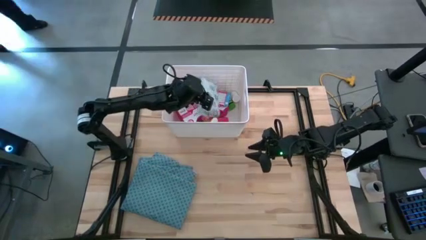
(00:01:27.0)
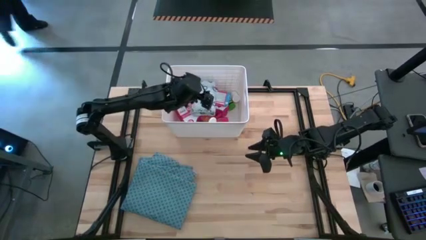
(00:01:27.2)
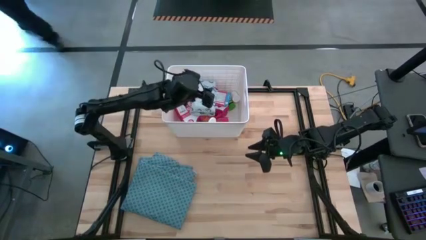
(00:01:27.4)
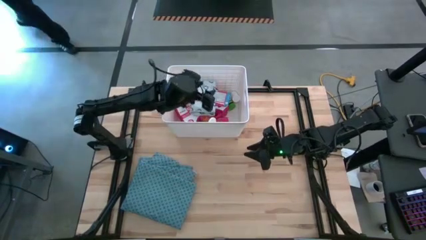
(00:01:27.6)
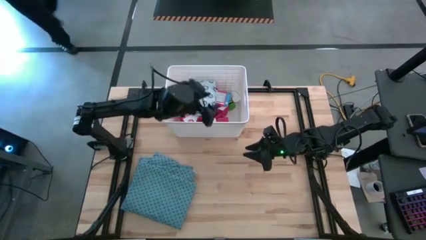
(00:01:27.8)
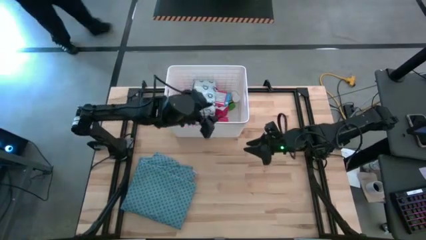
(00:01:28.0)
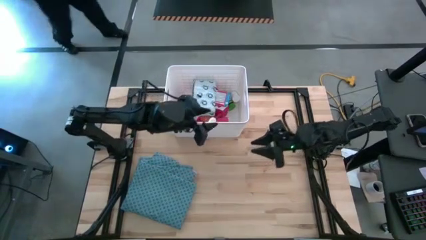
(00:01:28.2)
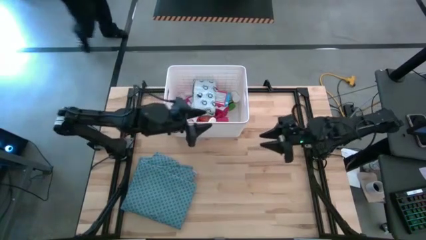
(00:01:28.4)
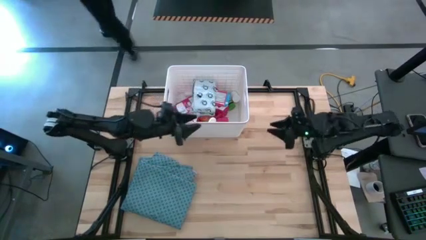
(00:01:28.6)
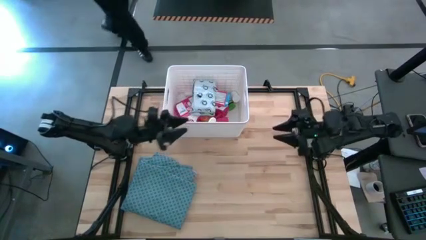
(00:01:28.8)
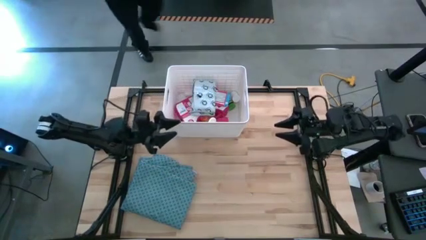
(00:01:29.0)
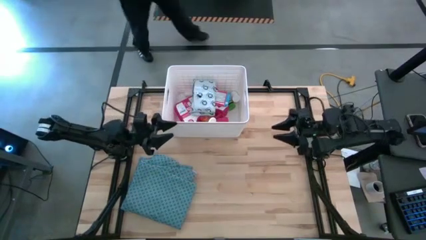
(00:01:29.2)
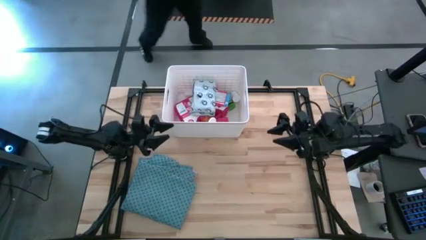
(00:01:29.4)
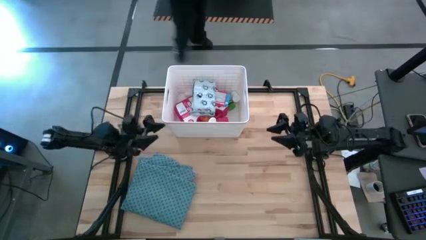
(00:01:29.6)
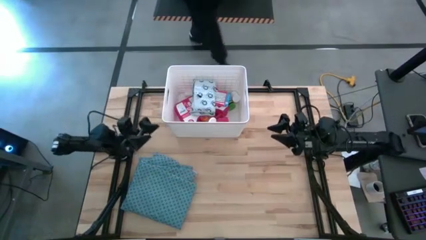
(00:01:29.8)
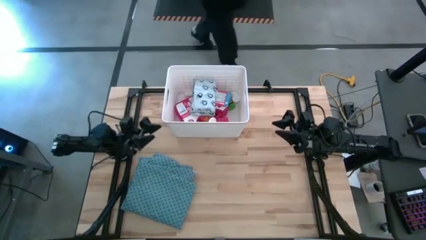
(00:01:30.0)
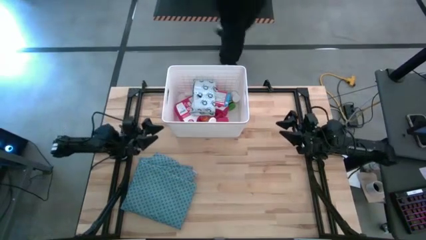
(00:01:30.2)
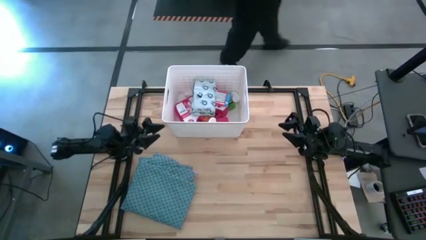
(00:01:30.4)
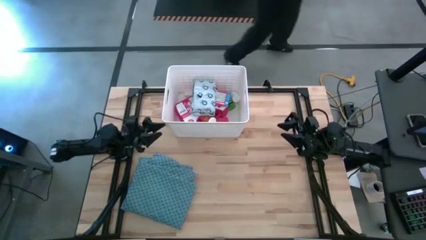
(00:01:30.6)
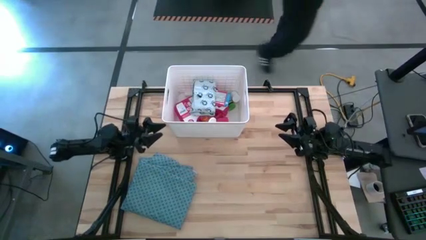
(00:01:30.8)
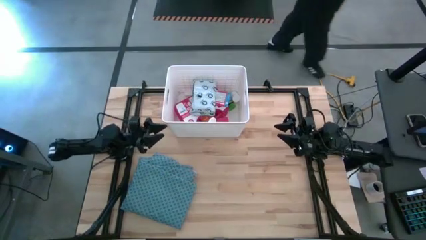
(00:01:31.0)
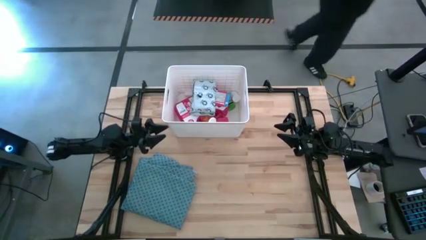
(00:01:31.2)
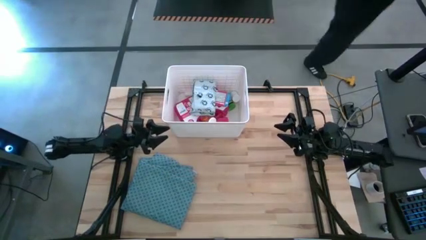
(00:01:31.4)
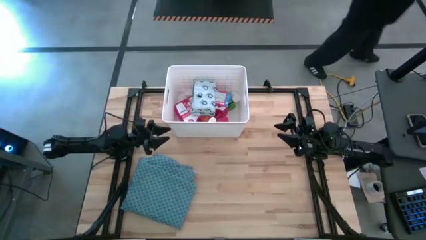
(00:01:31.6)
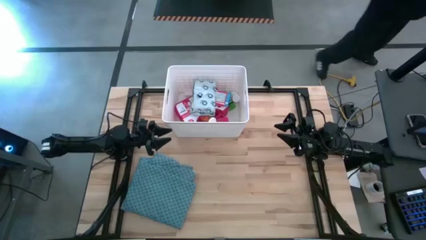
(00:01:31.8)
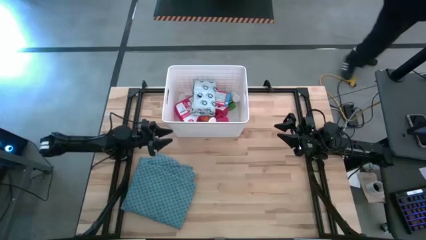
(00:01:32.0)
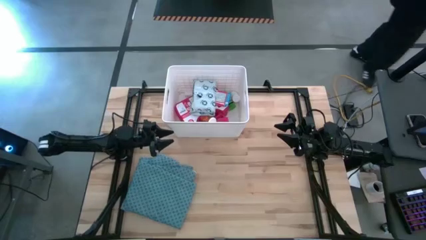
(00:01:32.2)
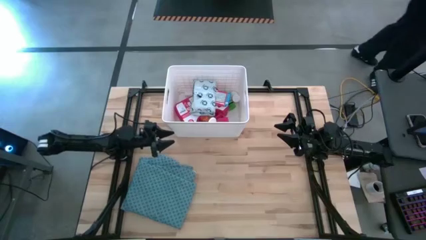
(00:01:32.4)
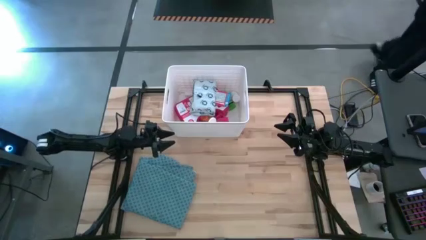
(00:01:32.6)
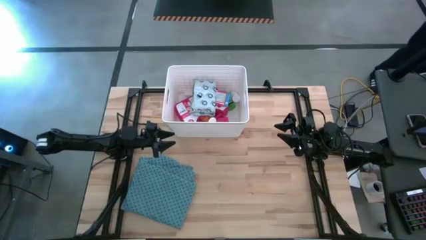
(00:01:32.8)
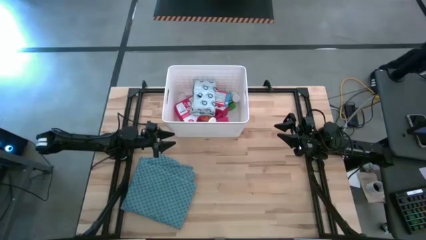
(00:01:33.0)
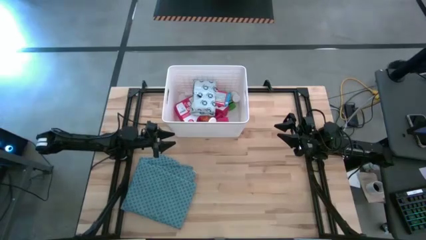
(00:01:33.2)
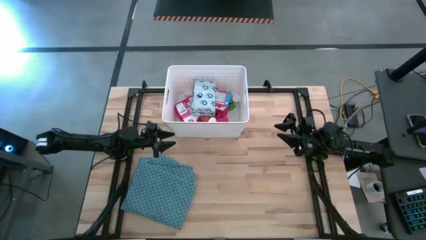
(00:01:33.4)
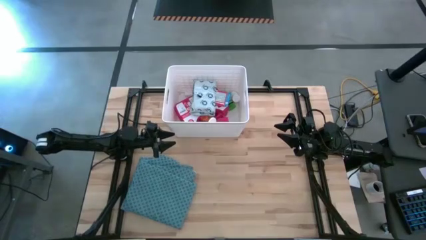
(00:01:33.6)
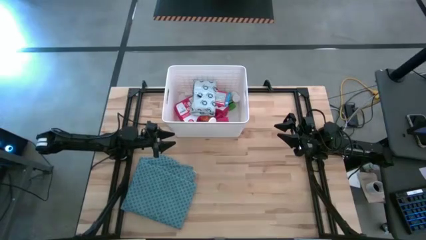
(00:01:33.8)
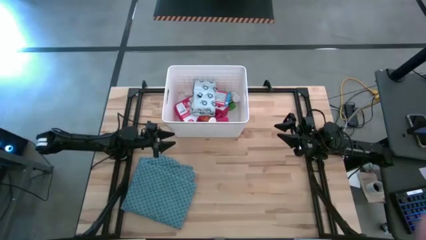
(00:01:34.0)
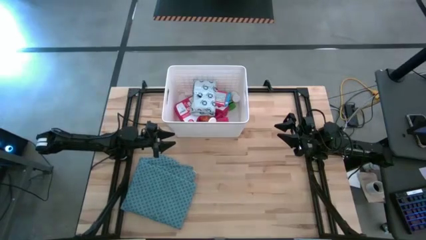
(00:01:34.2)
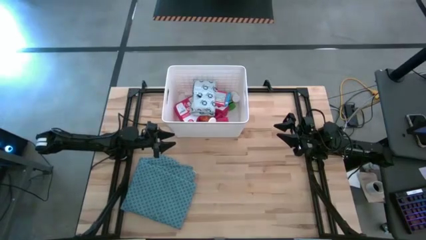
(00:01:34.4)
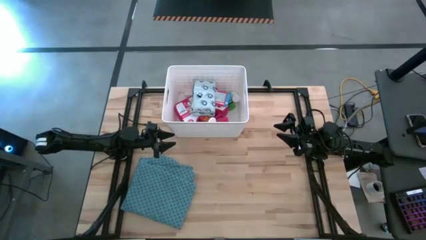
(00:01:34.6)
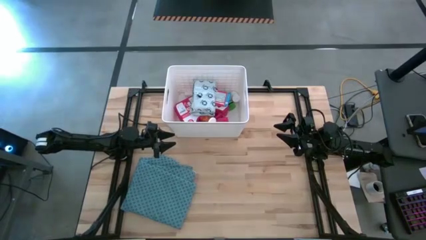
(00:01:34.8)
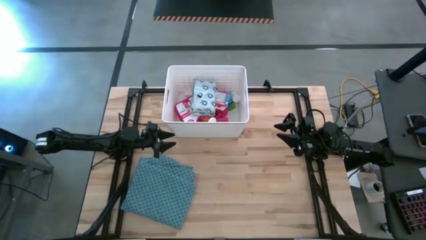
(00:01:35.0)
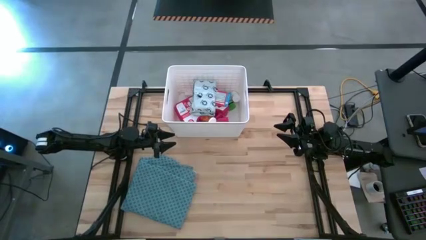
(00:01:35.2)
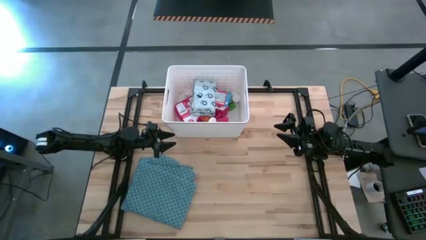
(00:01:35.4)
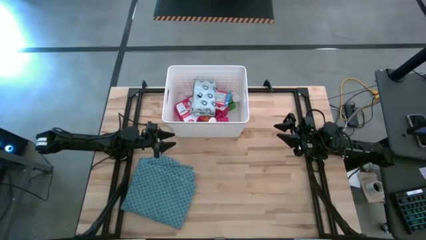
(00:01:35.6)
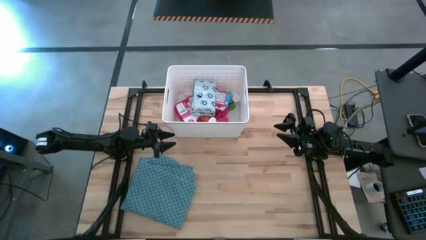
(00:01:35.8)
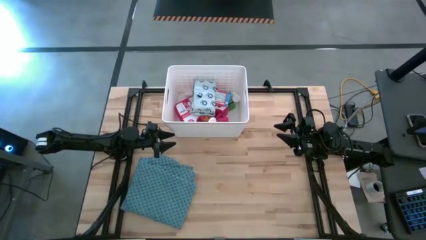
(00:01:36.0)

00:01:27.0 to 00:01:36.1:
Task: Pick & place medical supplies in basket/bin
Return to Home Position

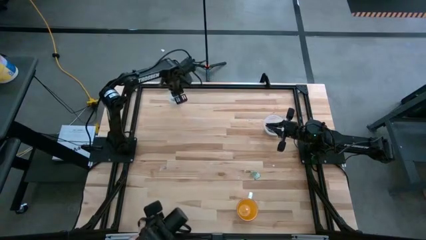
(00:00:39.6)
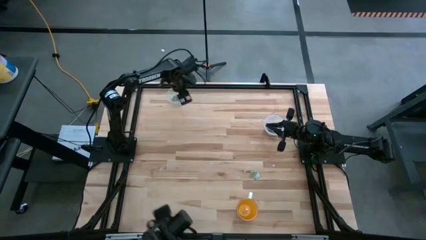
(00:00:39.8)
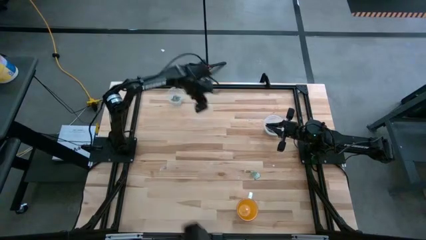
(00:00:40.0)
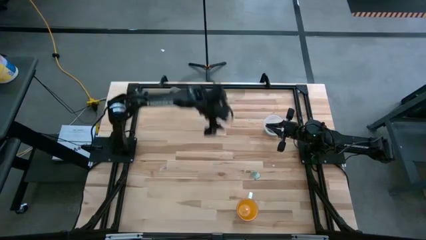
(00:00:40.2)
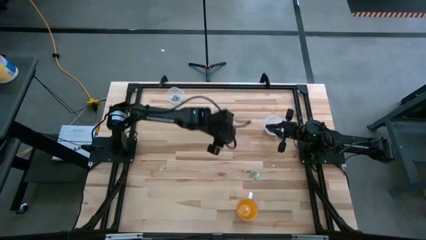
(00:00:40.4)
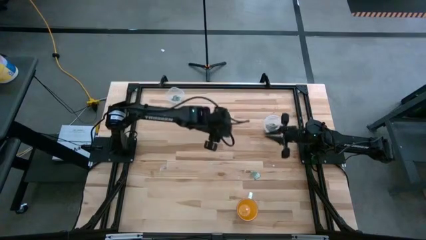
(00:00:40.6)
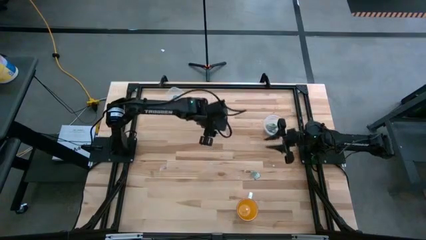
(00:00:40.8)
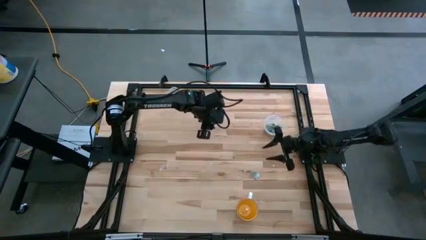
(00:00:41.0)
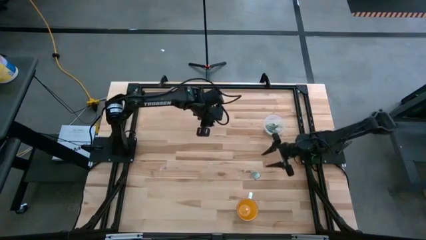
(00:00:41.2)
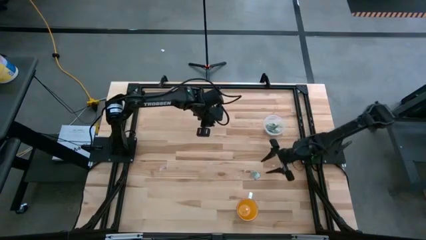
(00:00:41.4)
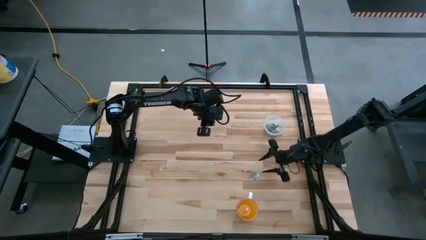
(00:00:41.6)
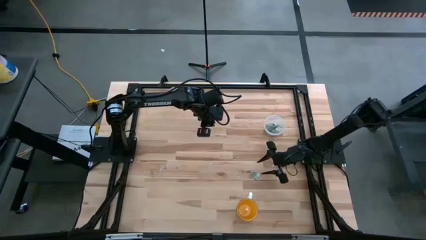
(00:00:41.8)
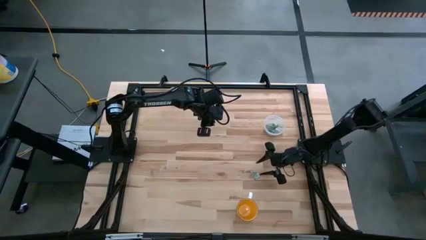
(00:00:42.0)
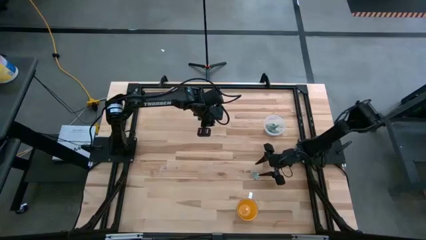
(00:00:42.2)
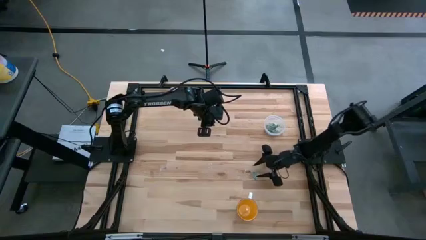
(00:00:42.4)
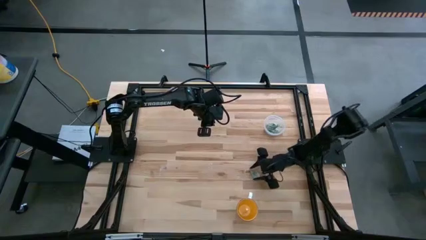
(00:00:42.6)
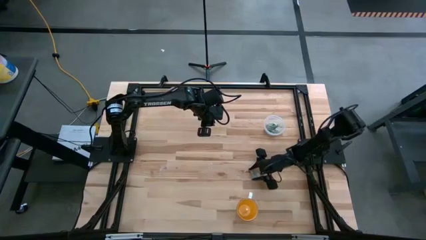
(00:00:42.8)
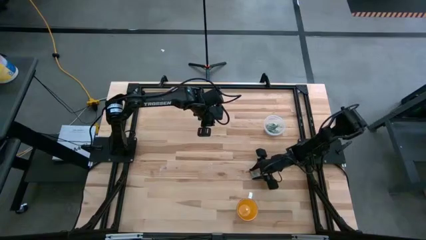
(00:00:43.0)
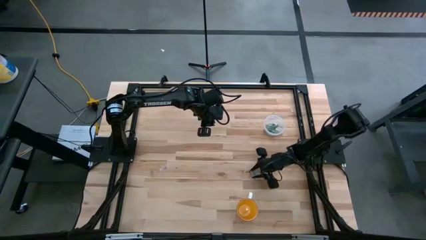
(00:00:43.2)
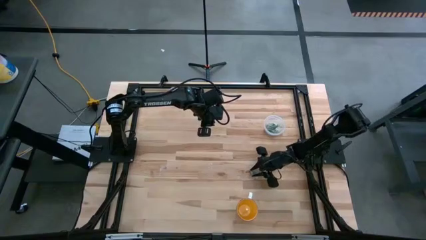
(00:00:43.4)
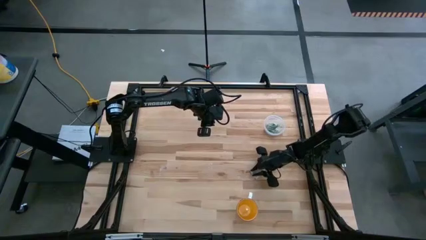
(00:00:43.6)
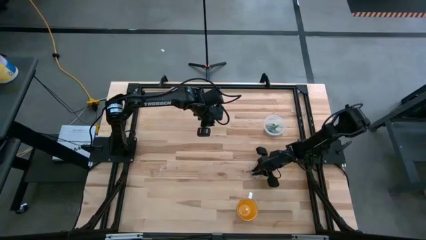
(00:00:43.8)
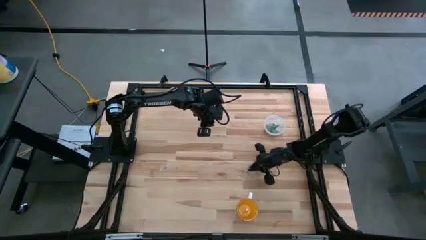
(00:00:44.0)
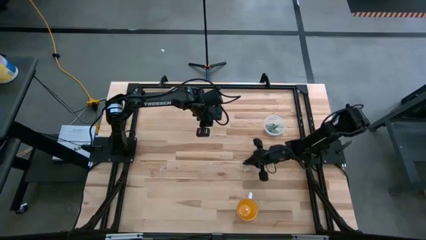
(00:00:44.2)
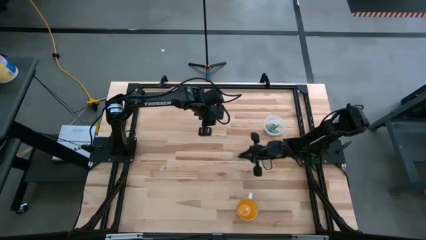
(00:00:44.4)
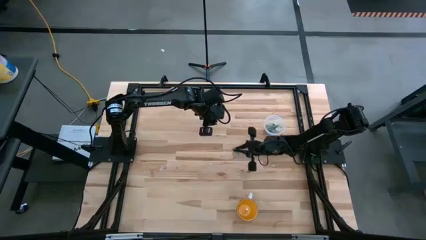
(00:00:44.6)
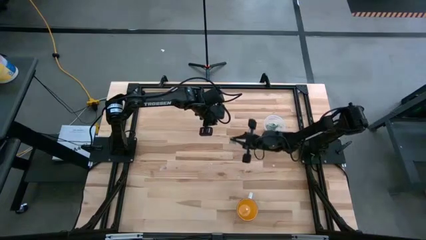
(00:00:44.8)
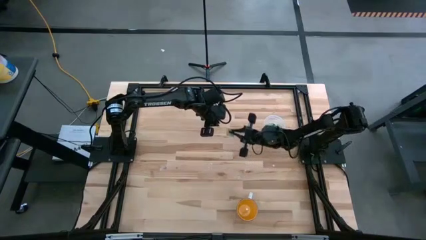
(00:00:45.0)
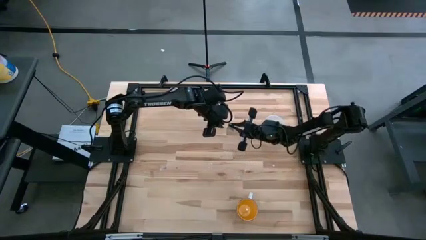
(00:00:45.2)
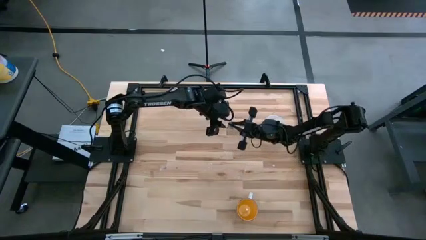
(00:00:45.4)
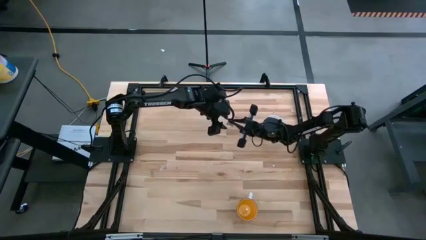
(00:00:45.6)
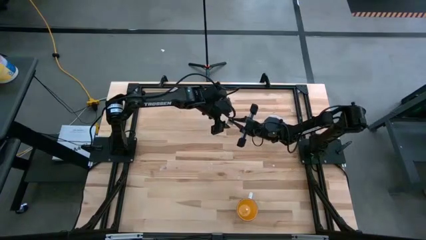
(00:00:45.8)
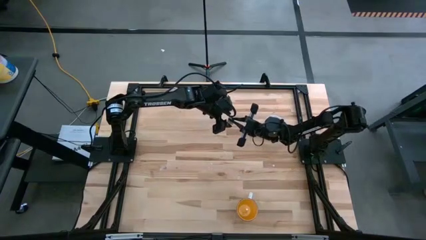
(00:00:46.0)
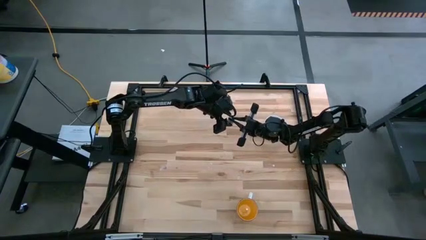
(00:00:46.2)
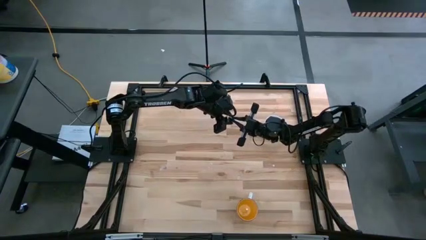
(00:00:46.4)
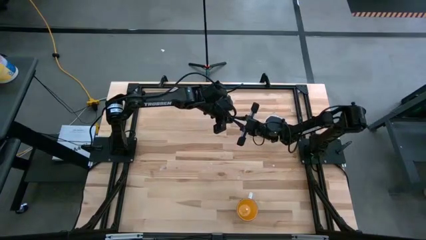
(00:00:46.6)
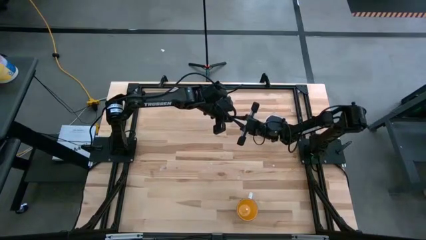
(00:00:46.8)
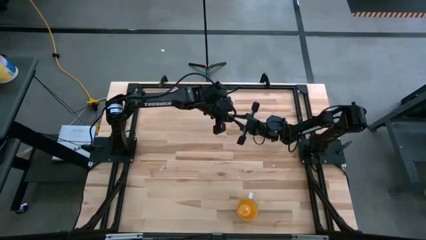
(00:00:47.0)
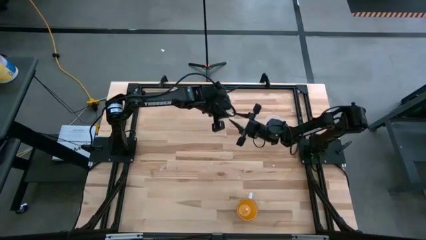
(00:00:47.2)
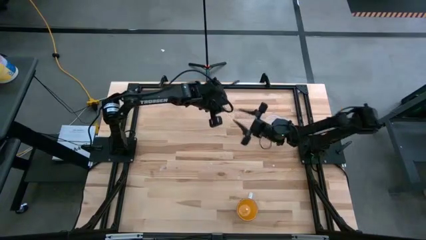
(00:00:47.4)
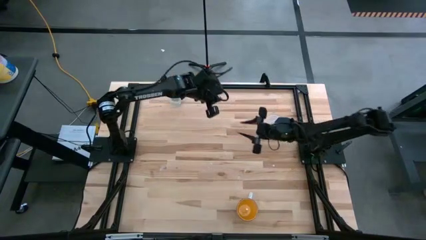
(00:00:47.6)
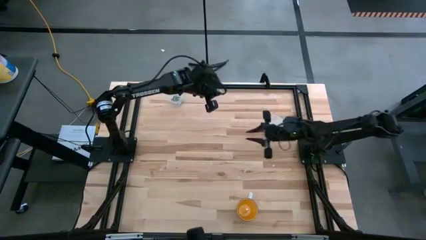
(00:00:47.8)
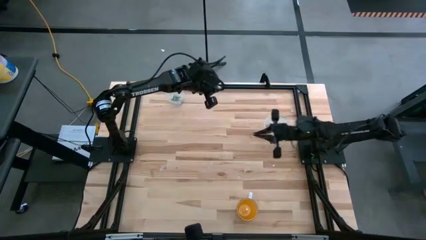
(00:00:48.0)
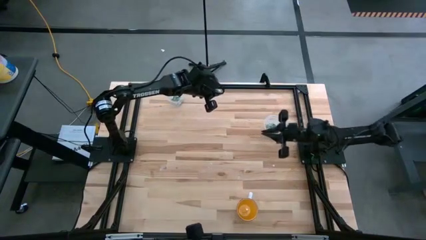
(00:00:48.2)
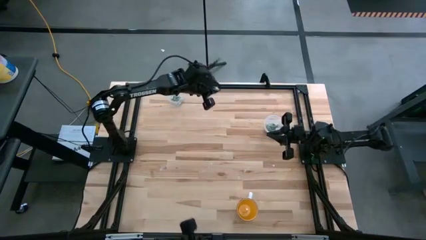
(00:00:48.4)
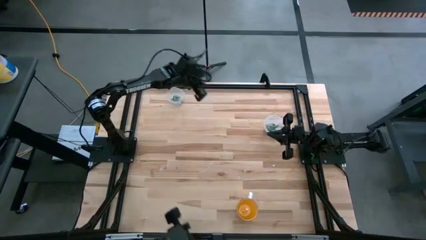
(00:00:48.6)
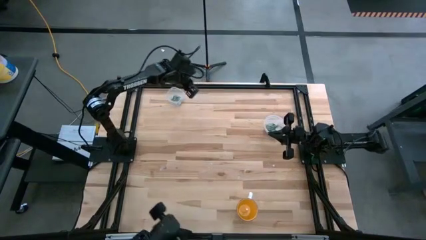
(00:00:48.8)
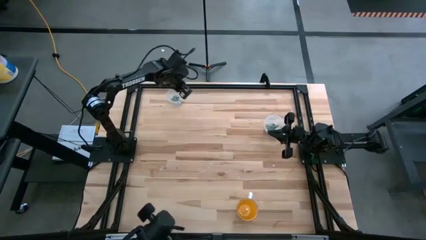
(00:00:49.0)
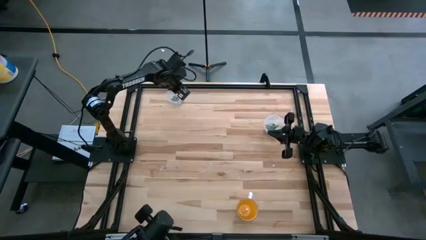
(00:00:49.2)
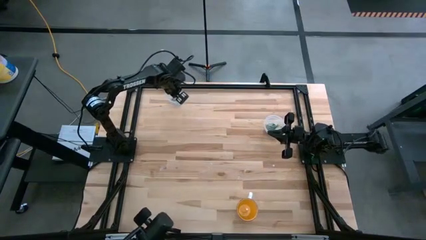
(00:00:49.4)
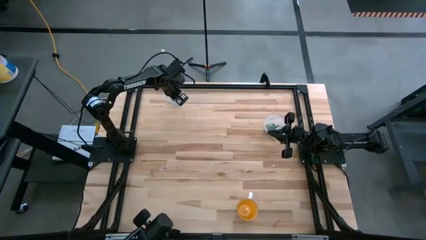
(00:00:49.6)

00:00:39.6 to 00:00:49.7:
Task: Pick and place items into bin
Put the stevia packet into the top transparent bin
